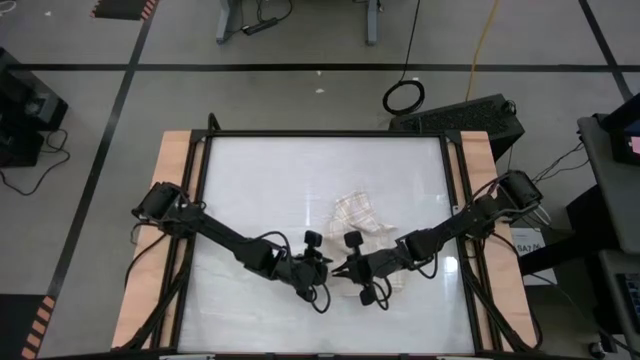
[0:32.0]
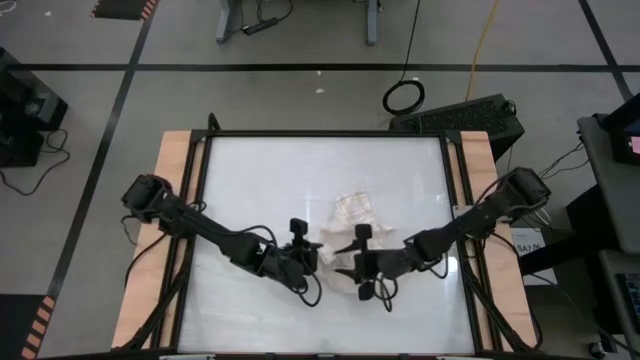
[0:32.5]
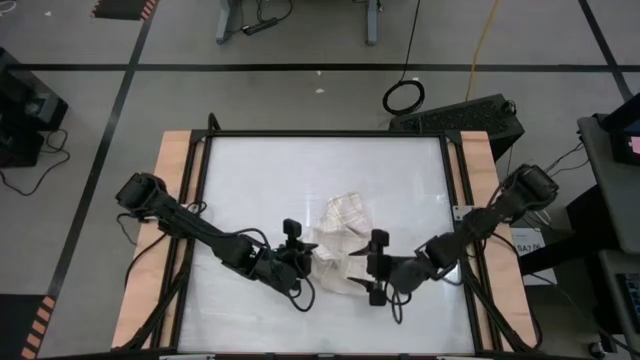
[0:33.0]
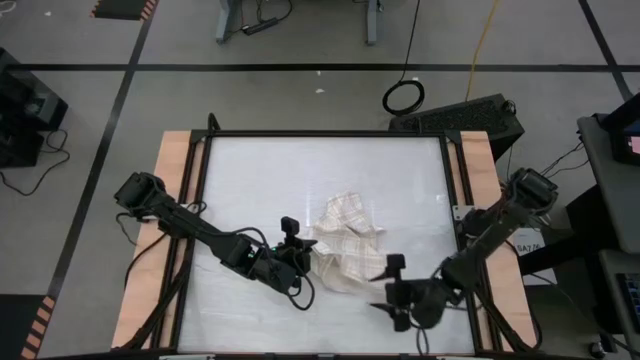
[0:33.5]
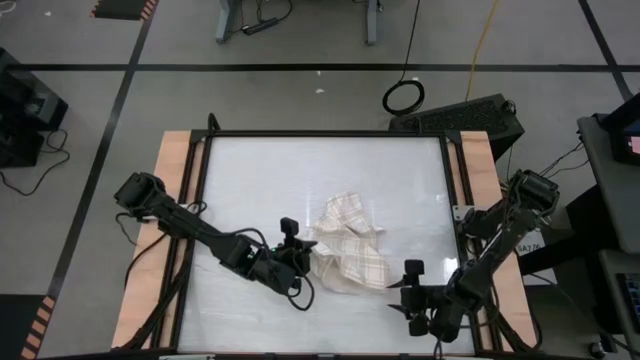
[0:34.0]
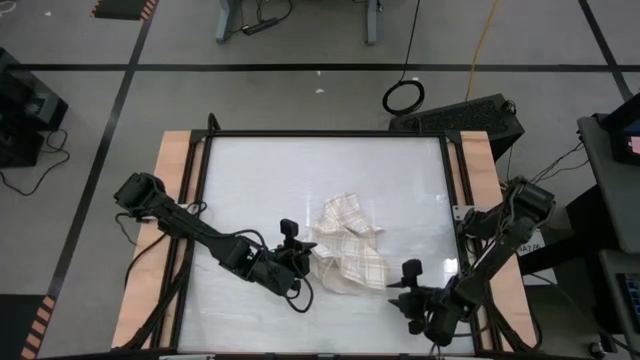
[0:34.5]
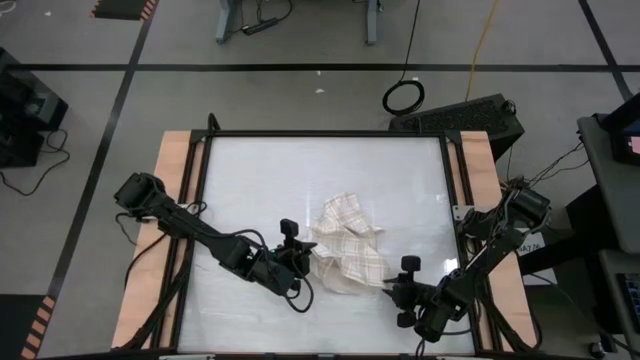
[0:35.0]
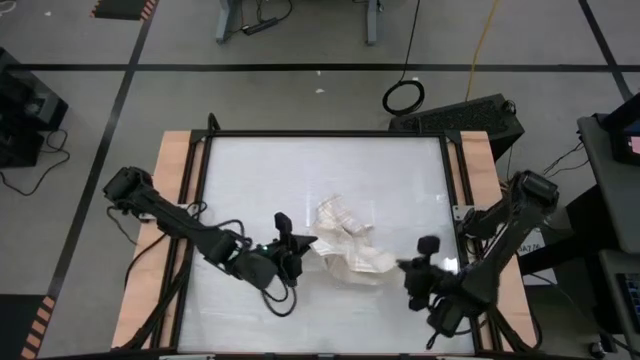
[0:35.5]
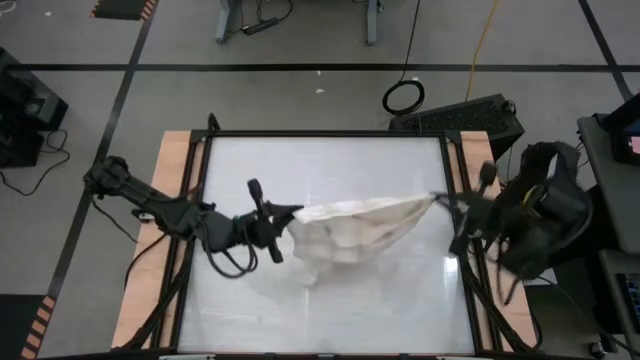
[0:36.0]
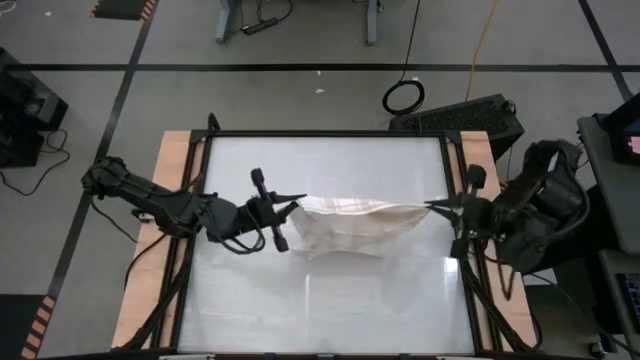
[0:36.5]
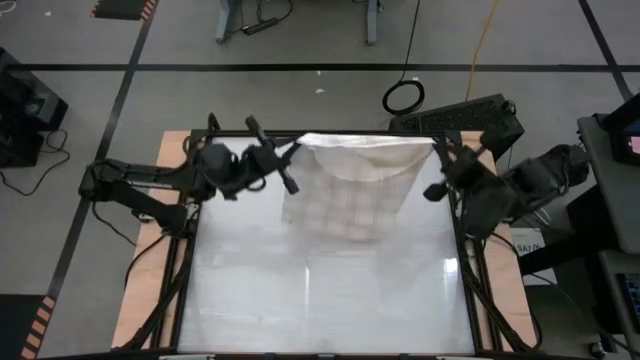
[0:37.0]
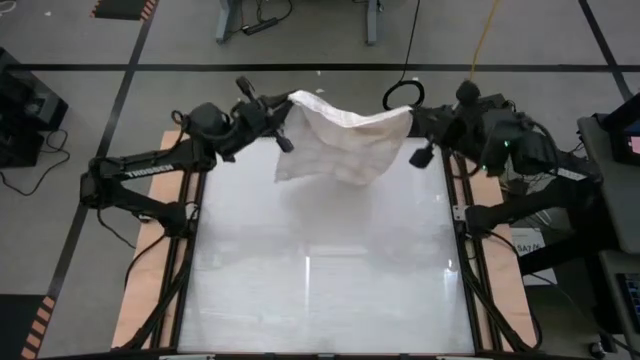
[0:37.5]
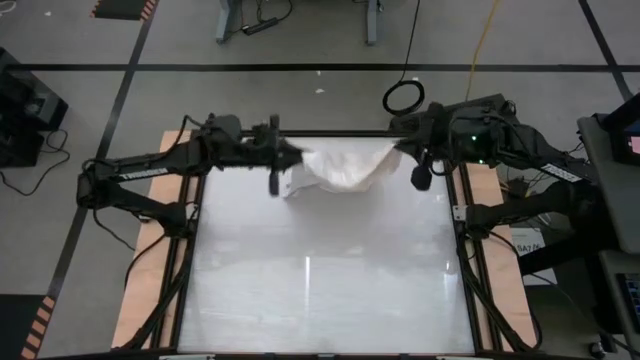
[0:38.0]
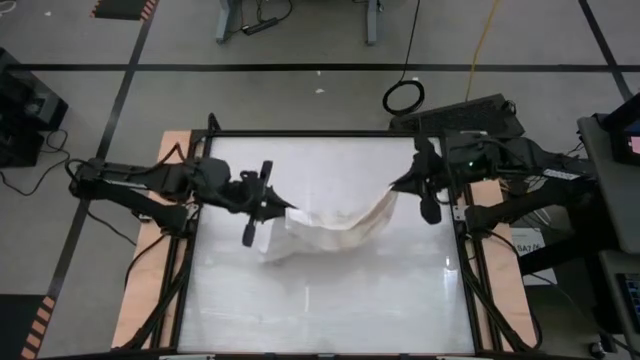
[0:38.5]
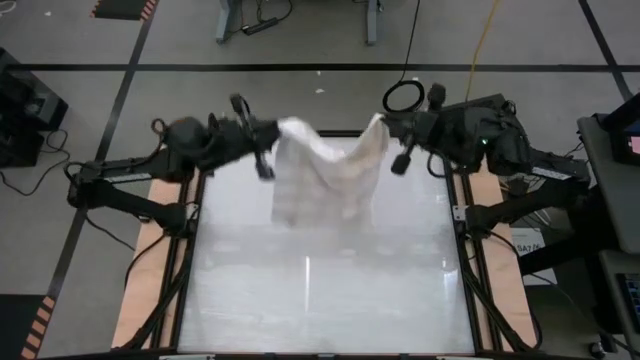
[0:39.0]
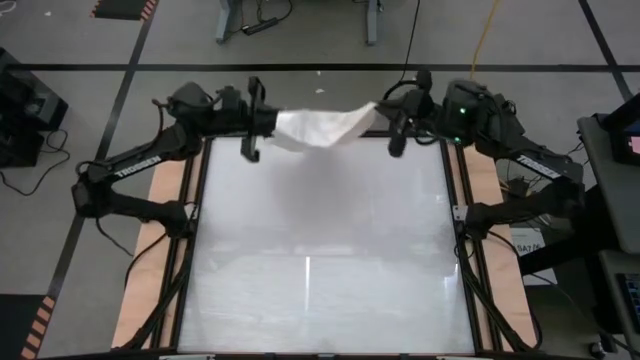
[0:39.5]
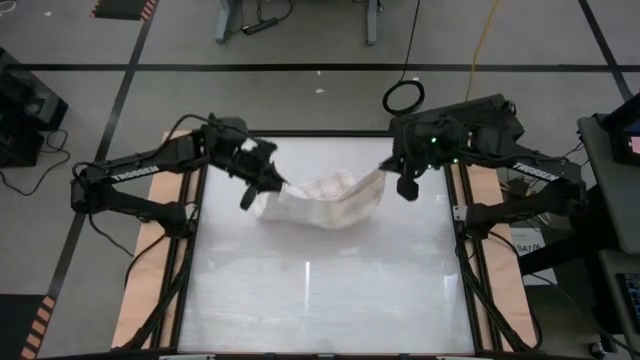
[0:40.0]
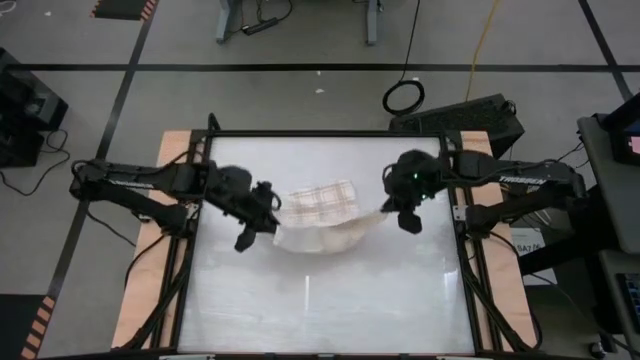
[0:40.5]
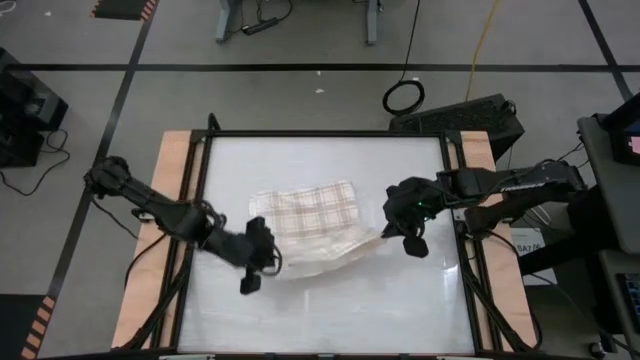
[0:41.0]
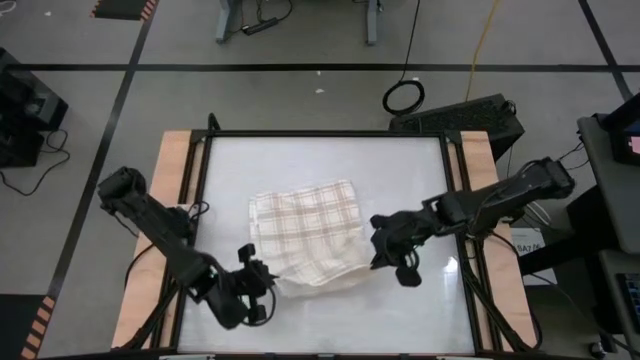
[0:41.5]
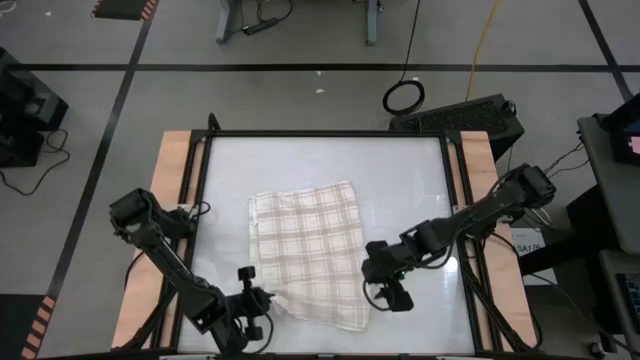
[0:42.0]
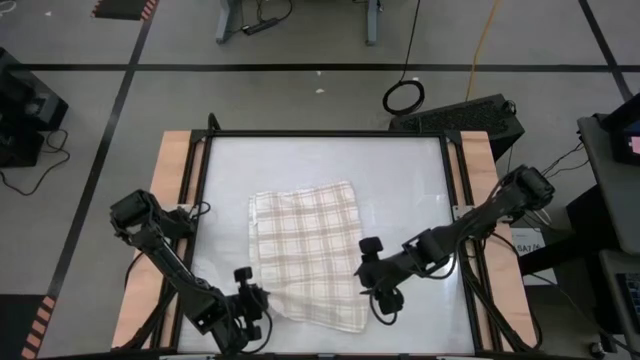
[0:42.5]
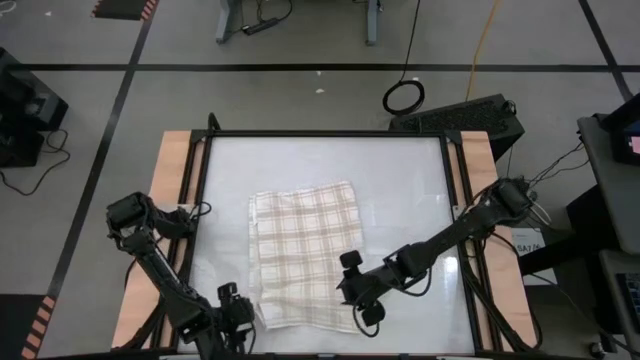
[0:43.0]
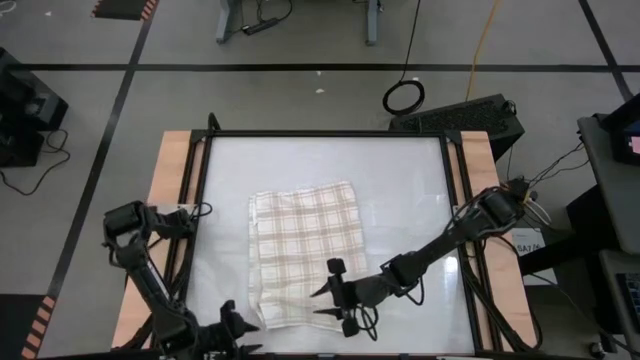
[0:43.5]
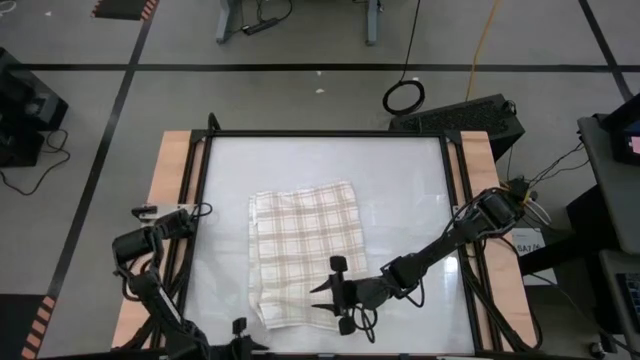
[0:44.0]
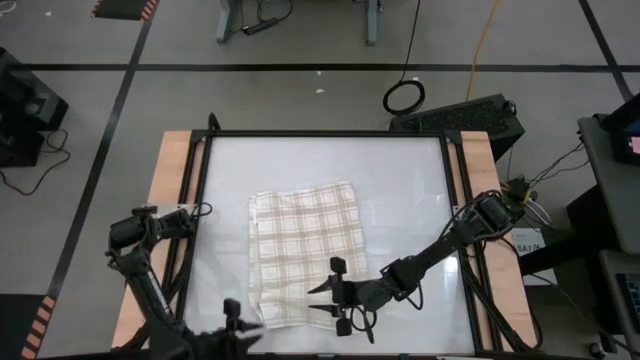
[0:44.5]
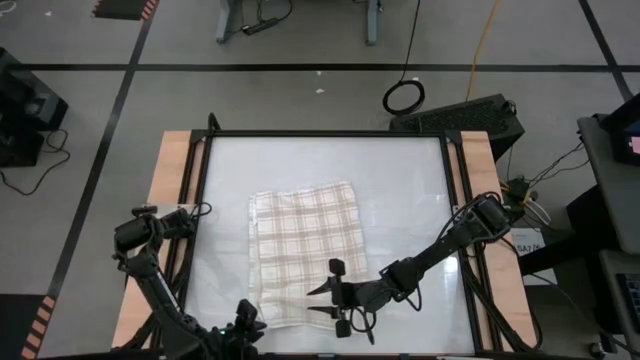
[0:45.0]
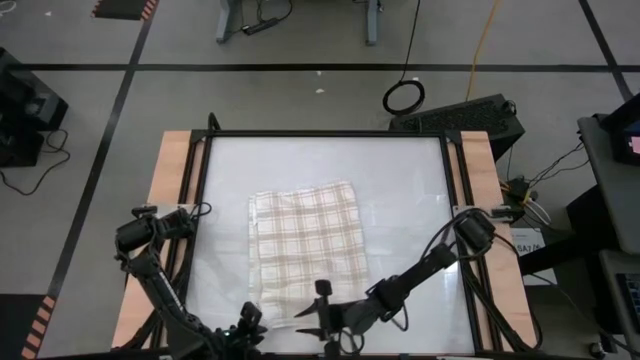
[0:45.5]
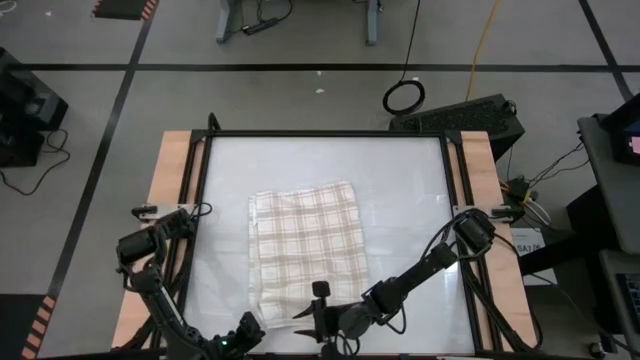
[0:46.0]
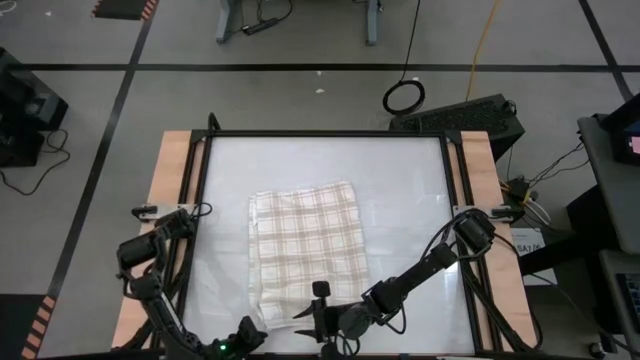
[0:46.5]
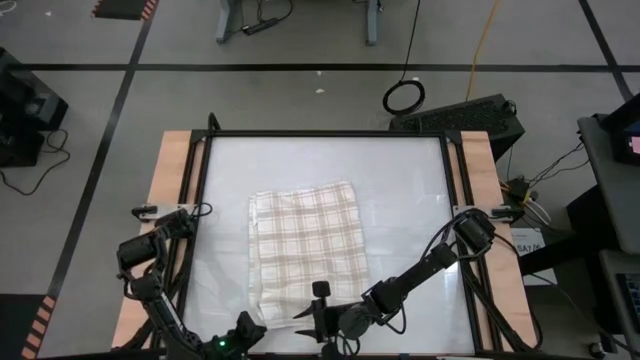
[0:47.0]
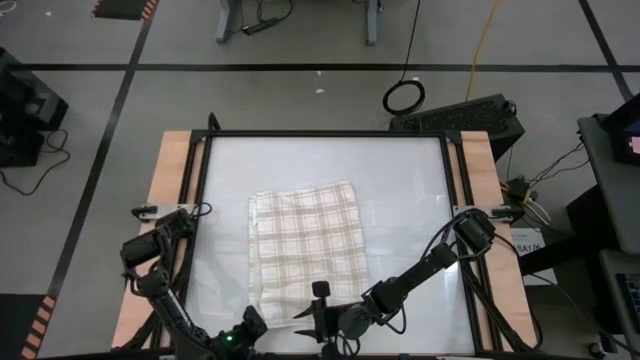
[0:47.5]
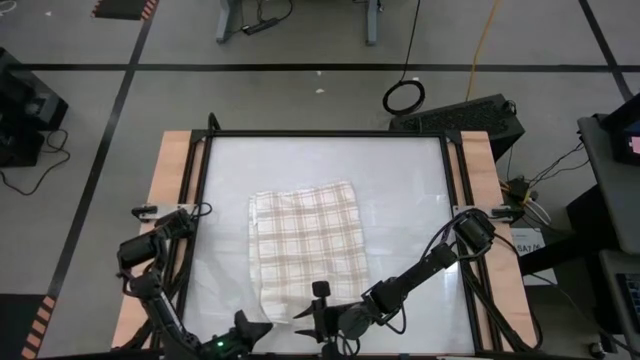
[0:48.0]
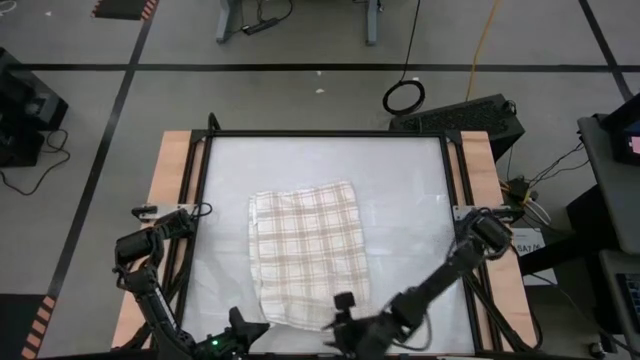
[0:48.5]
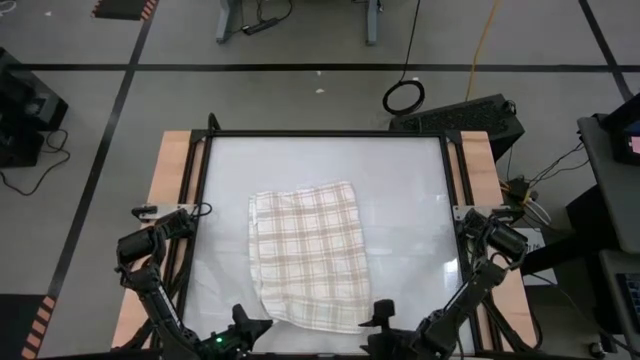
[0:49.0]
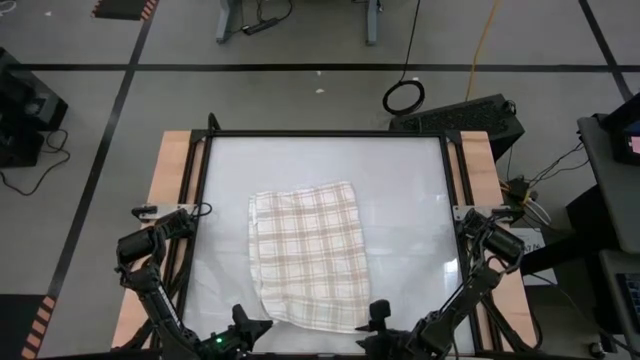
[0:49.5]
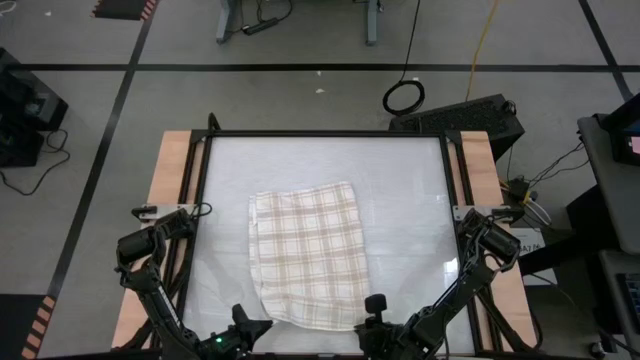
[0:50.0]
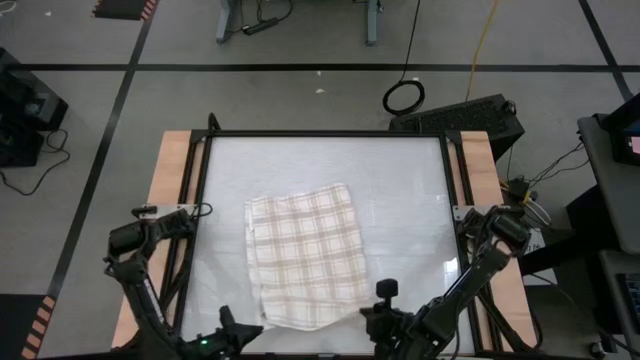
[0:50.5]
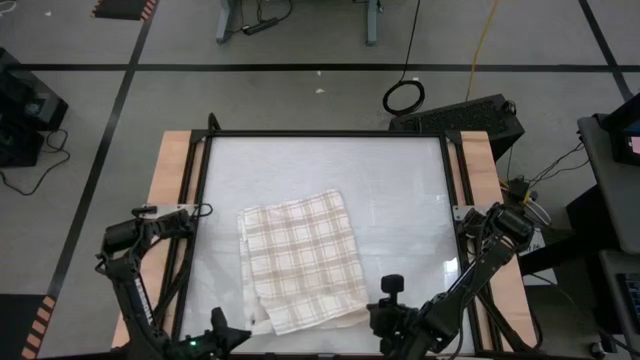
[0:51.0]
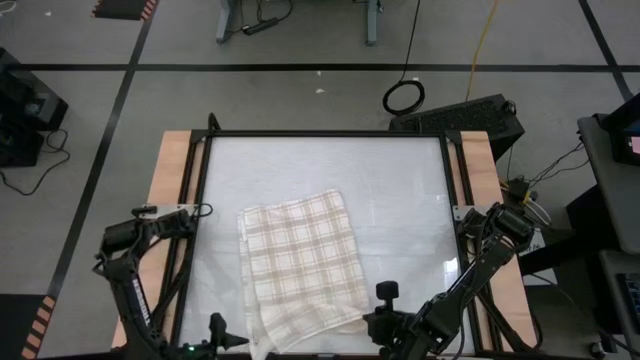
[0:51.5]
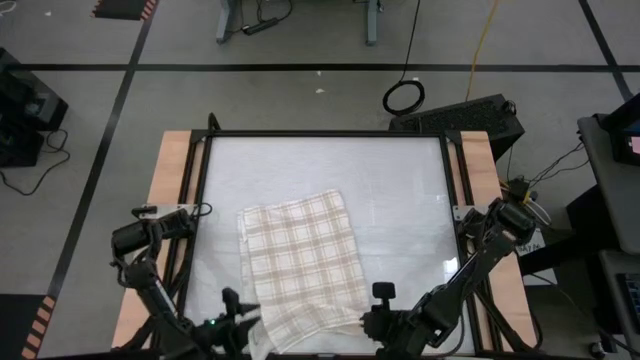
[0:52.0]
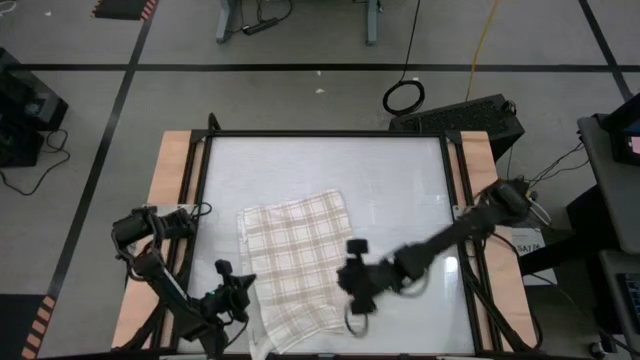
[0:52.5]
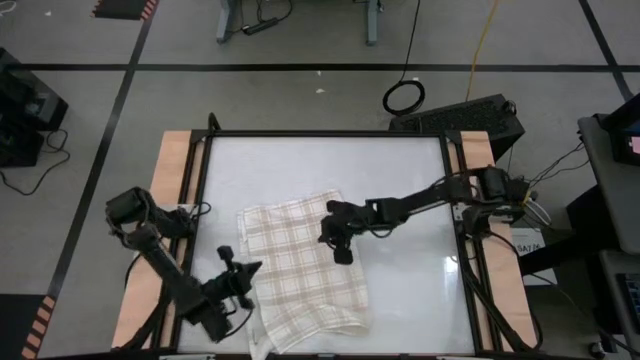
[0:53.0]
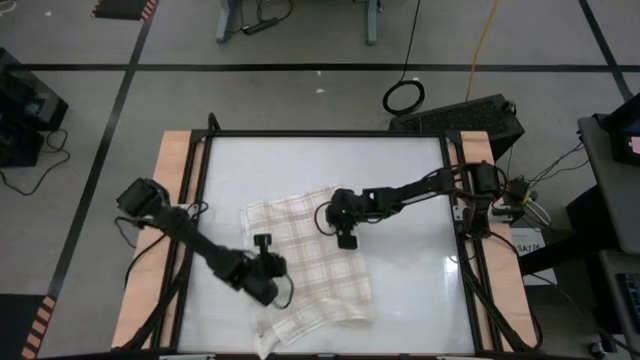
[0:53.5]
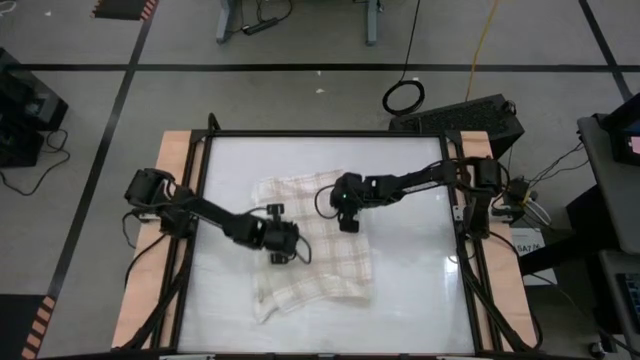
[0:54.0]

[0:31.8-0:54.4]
Task: Roll towel
Roll the white towel
